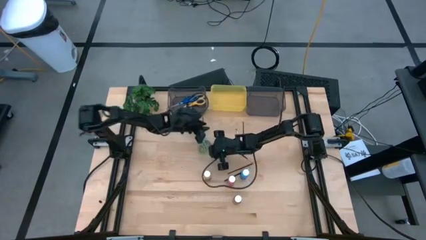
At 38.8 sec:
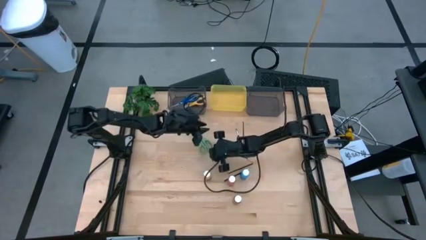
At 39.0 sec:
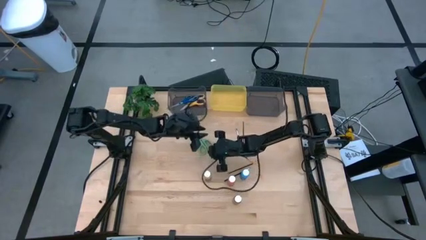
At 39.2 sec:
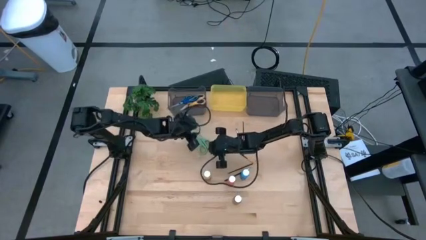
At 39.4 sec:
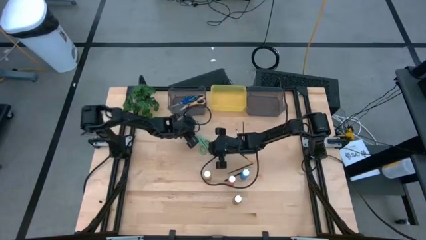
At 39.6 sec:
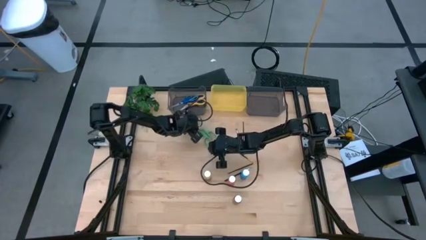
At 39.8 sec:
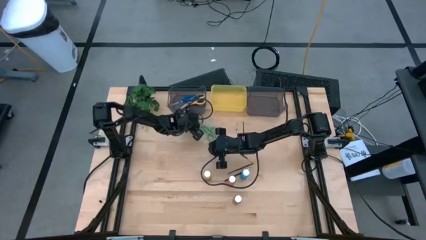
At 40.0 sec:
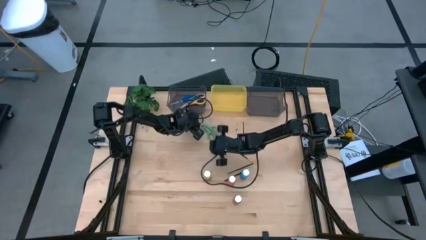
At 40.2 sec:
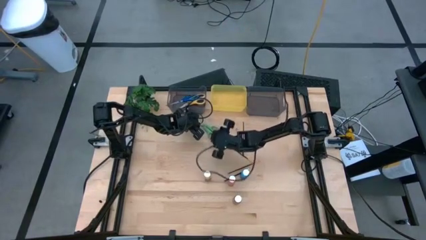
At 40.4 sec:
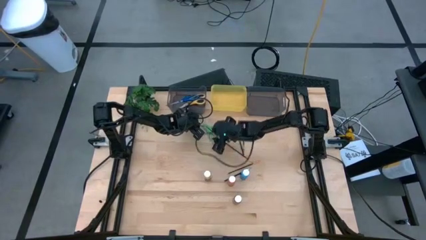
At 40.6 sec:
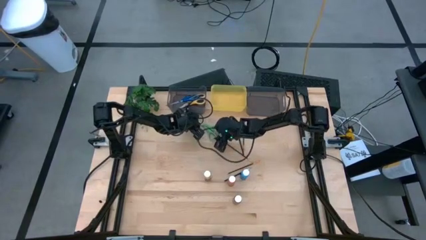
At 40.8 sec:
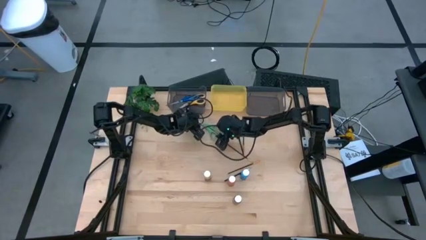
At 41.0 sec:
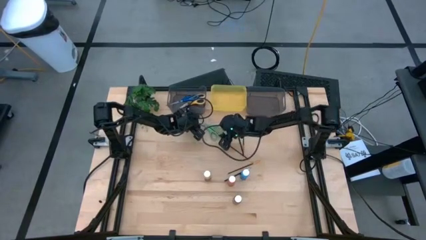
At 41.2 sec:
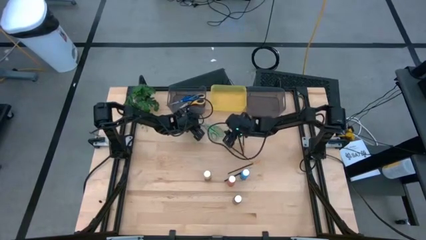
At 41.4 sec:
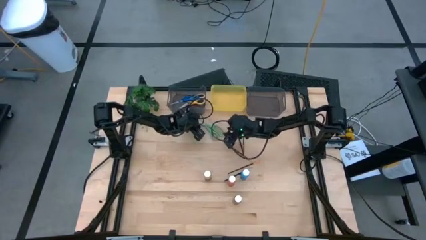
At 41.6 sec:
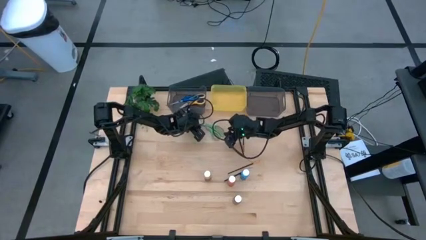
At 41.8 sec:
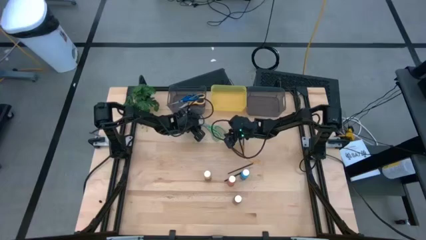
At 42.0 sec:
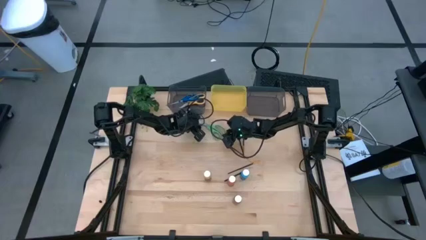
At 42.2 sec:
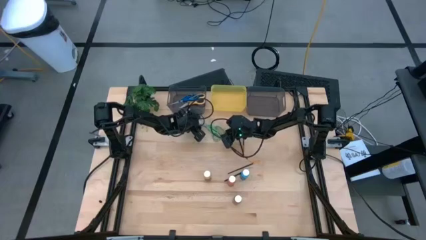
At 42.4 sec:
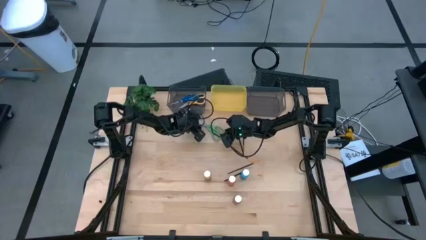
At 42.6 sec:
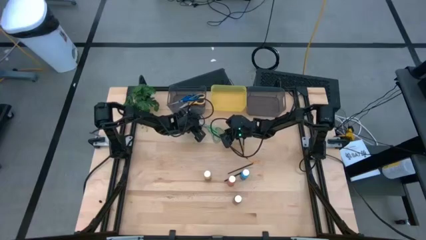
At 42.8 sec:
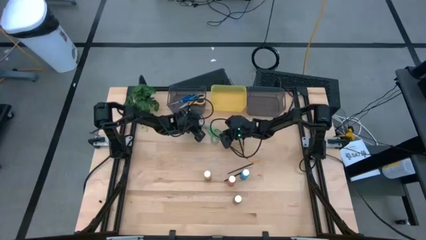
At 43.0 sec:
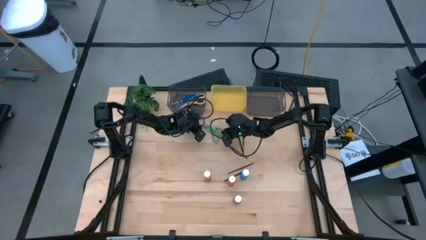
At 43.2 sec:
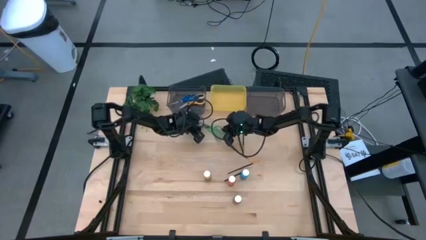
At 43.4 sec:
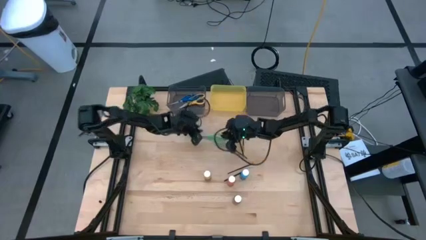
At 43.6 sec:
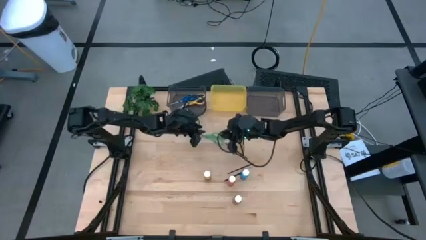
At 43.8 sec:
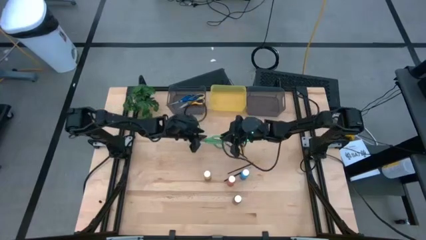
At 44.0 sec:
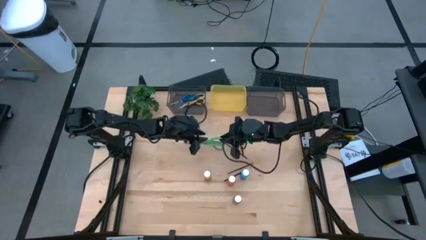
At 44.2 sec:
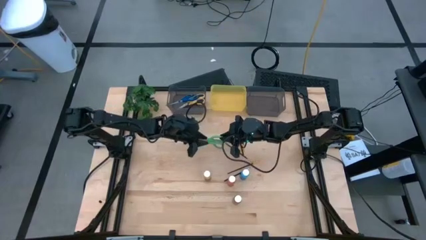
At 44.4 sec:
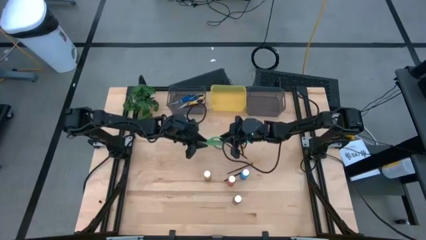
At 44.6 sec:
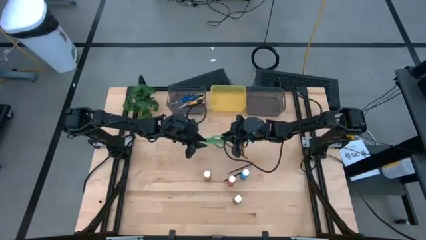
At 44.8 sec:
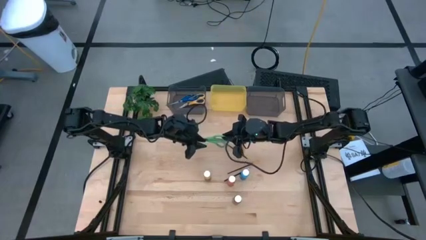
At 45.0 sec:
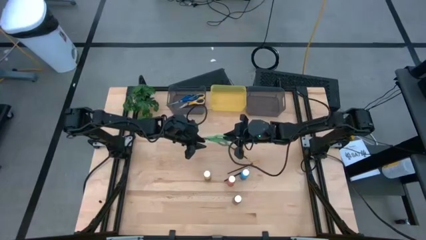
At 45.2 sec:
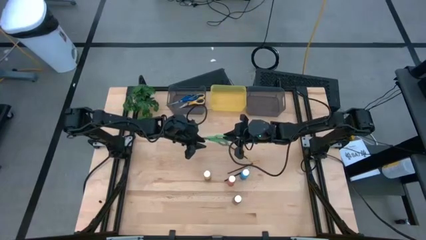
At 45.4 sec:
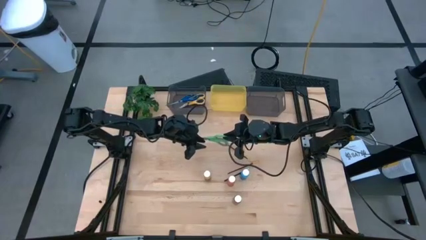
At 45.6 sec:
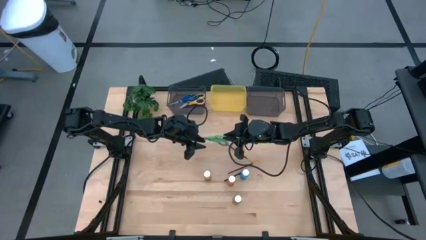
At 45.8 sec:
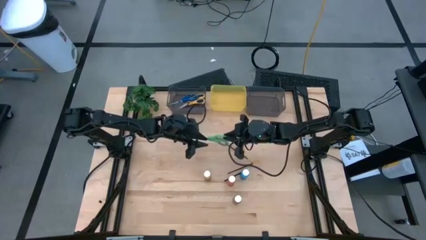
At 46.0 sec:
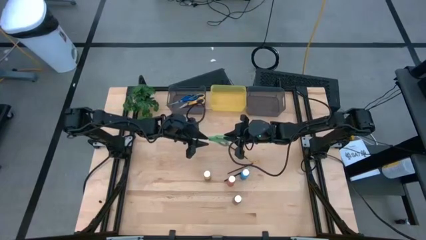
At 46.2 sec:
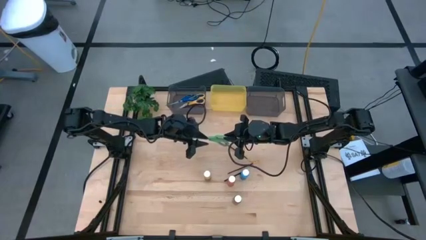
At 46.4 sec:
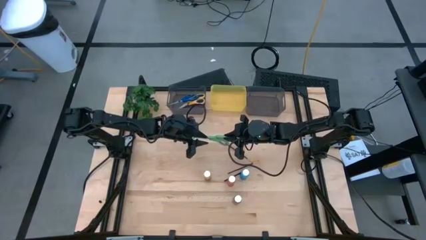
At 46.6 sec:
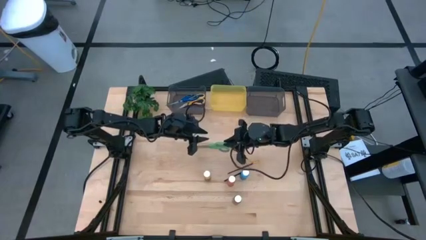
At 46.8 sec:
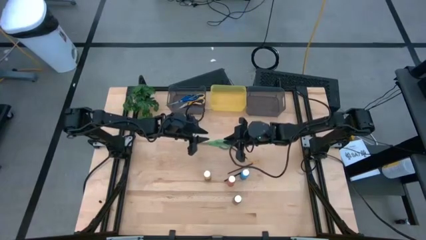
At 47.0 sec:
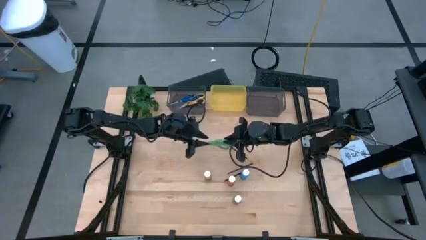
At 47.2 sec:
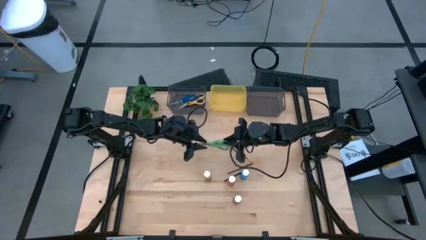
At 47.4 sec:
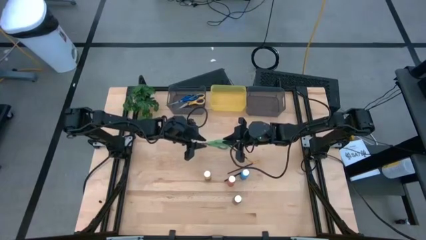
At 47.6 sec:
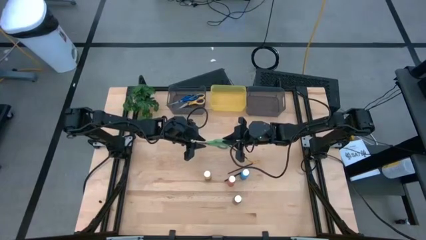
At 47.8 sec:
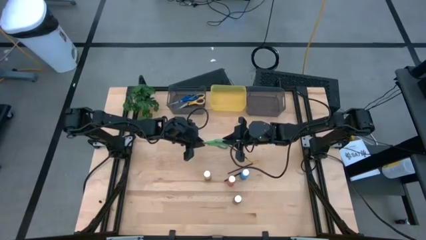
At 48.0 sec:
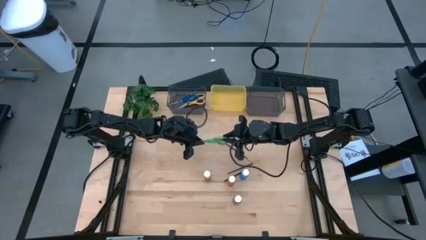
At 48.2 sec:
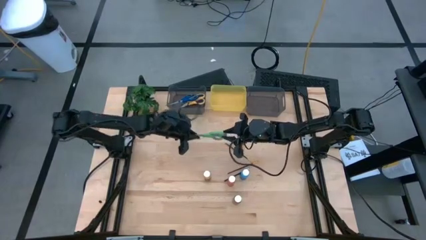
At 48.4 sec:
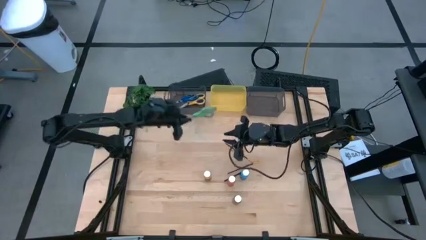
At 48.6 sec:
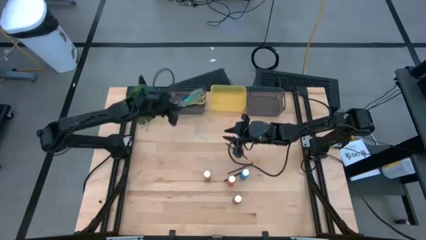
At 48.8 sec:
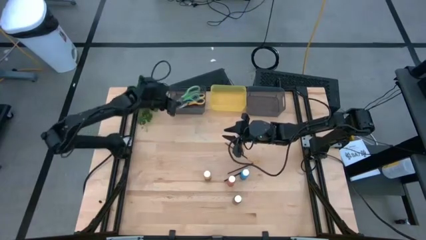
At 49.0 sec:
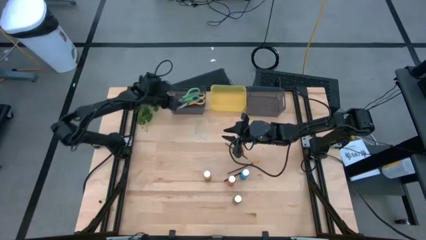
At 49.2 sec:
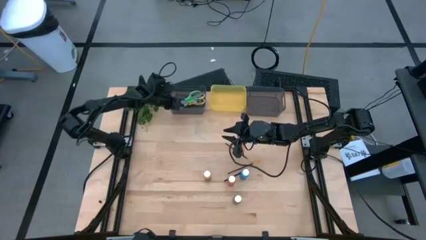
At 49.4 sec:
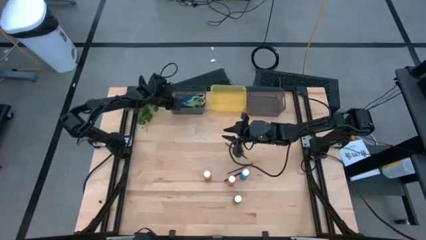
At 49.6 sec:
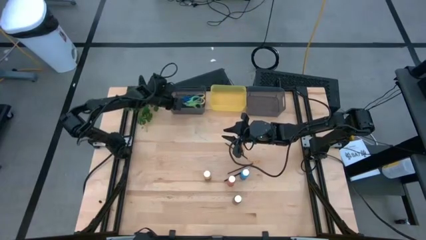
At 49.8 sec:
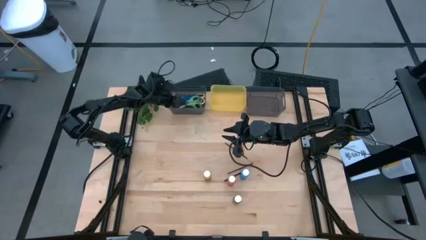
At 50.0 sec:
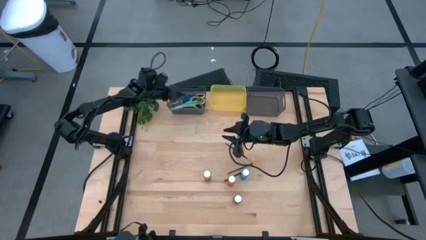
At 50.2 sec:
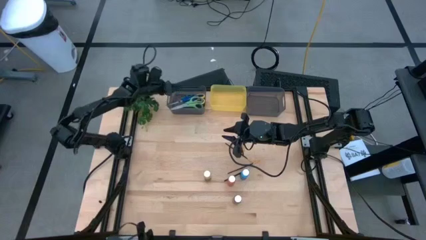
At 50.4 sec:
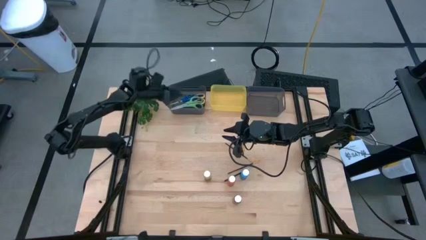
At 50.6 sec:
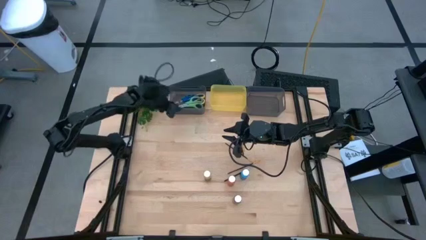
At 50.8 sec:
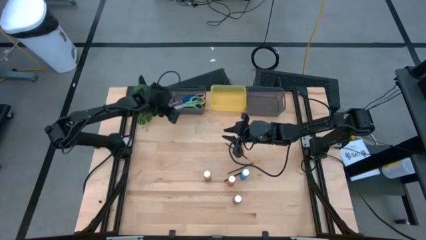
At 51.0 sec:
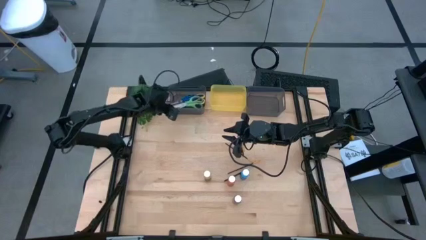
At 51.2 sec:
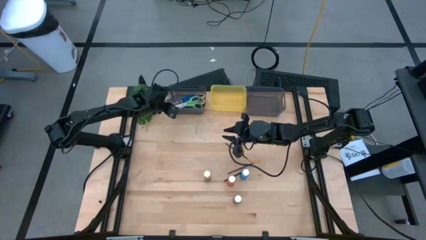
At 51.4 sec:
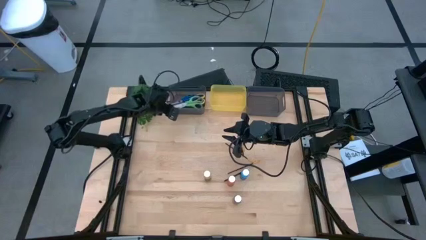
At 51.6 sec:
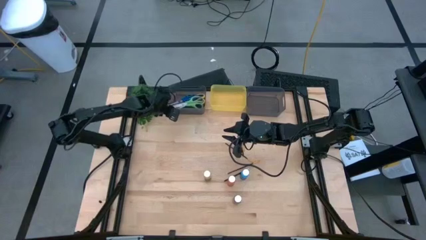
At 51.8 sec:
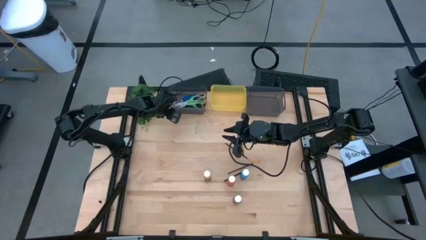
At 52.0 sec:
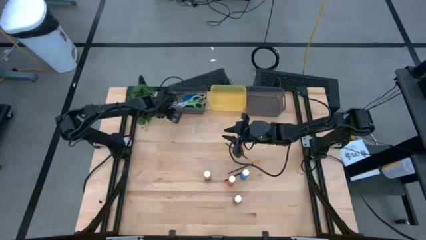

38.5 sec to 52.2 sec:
Task: Pick & Place Paint Supplies
Put the green scissors into the left black bin
